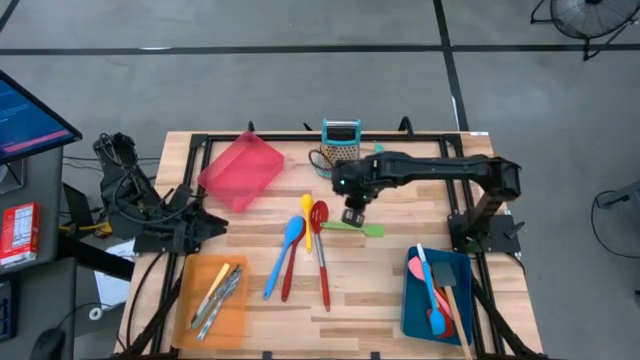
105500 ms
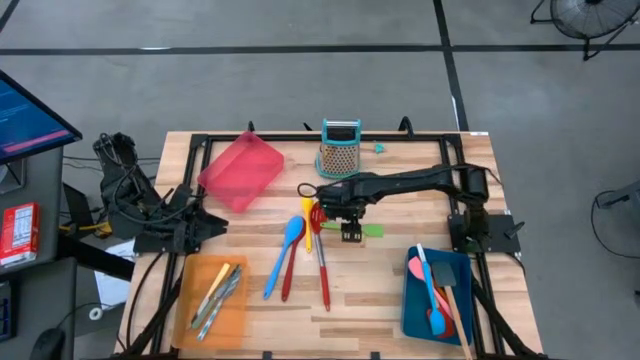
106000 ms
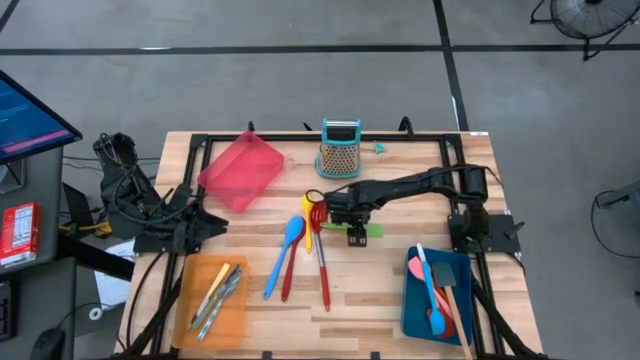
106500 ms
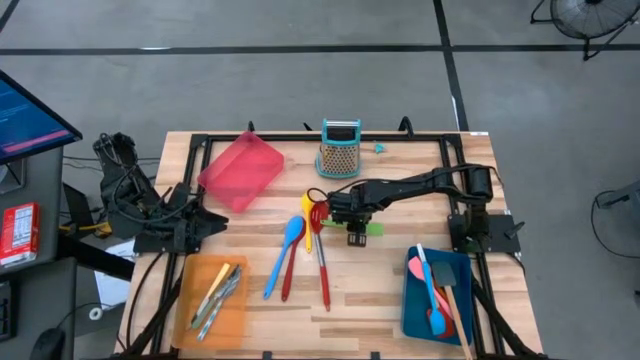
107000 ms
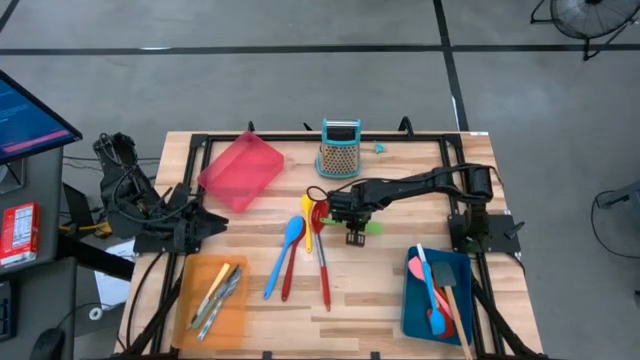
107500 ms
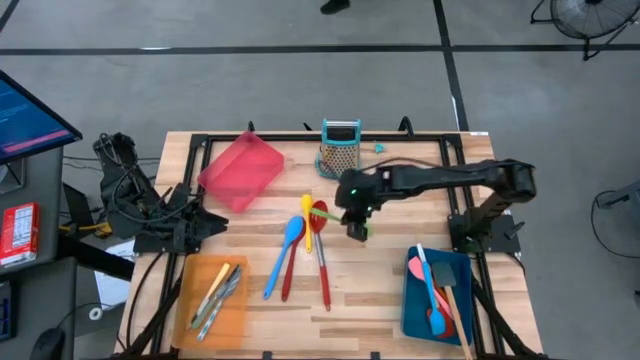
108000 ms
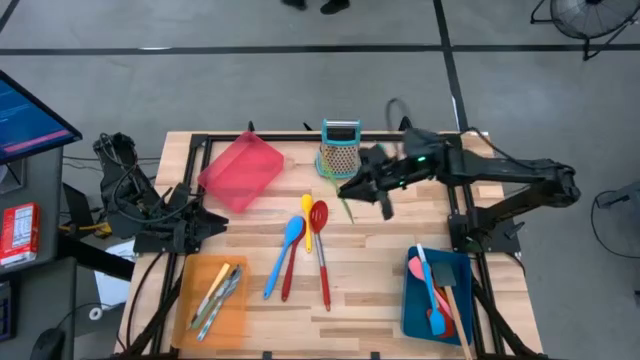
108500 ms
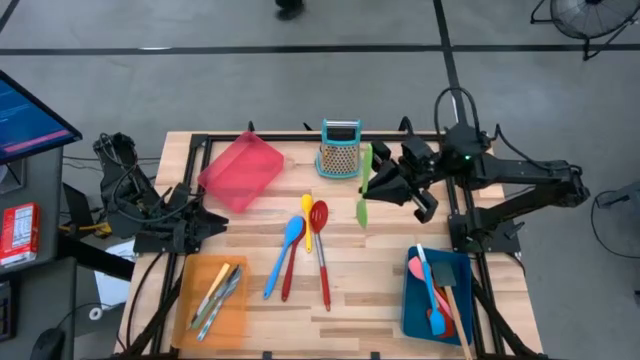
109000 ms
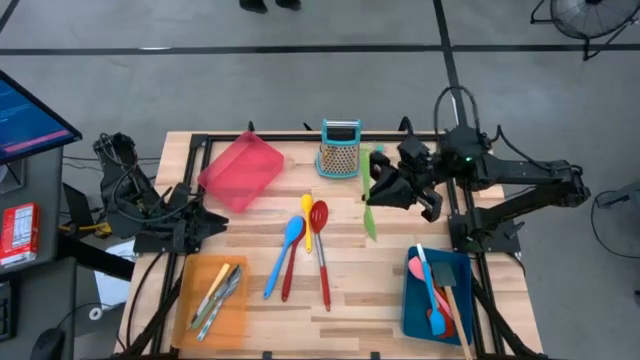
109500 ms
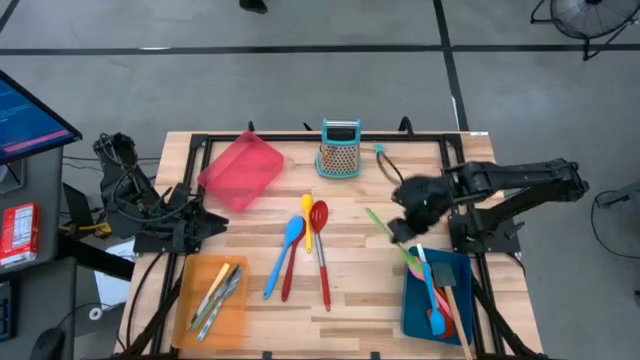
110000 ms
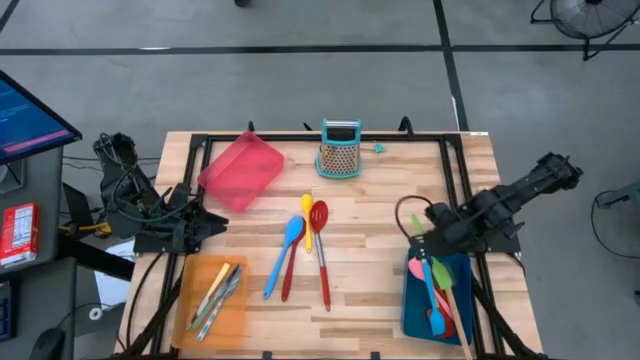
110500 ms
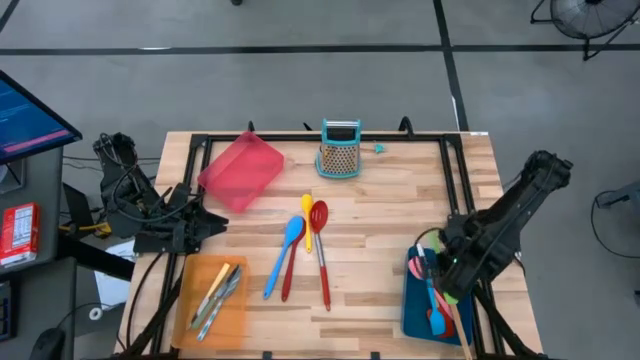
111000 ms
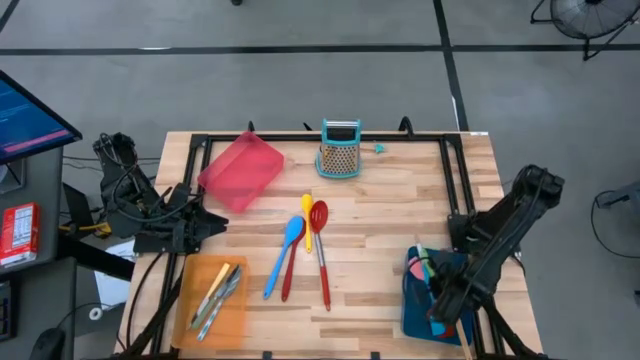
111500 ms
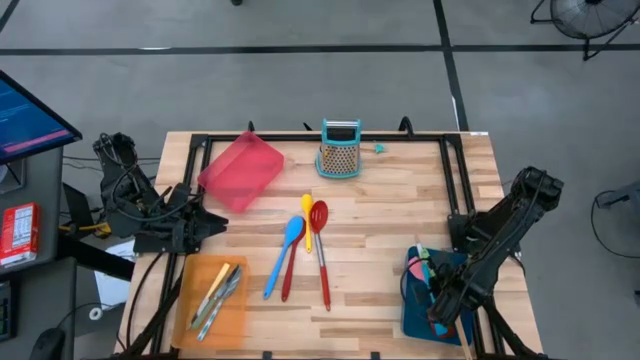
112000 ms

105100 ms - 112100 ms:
Task: Pick & Place Kitchen Items
Put the green spatula into the blue bin

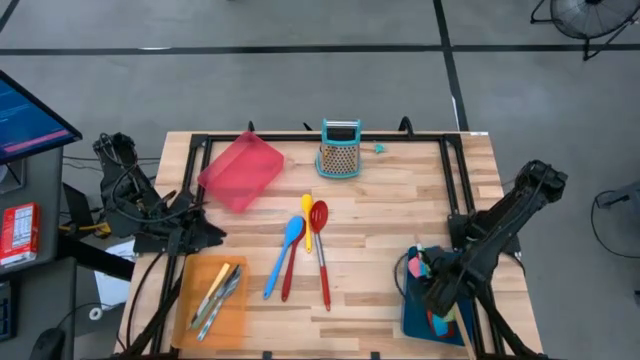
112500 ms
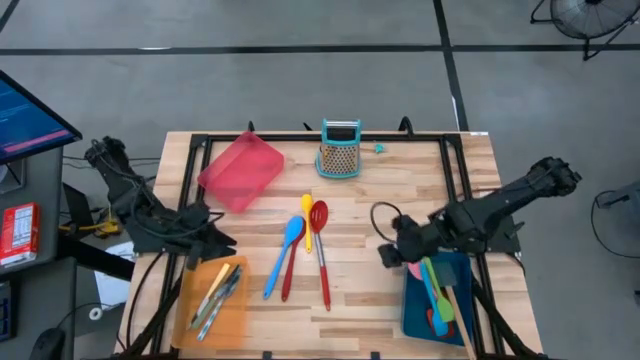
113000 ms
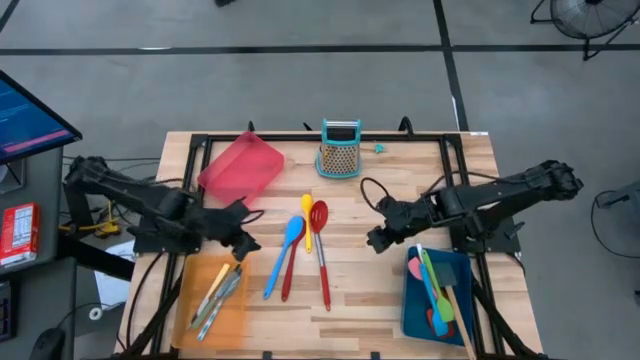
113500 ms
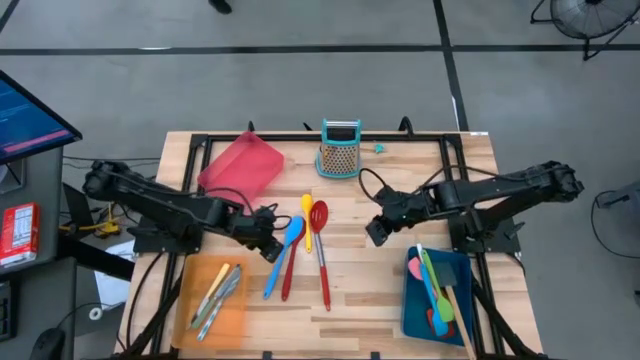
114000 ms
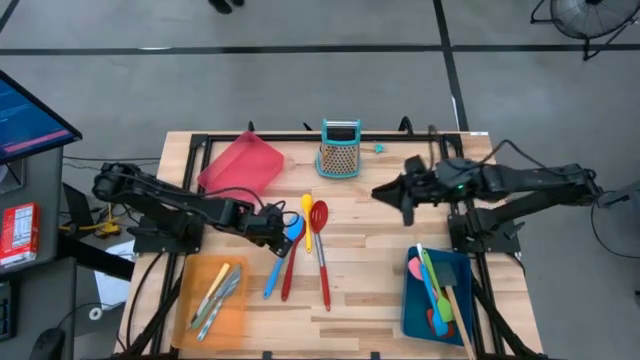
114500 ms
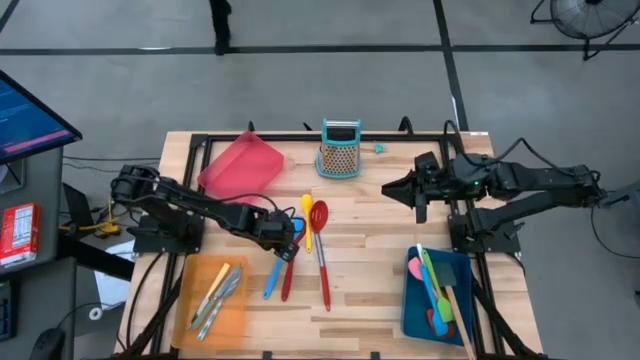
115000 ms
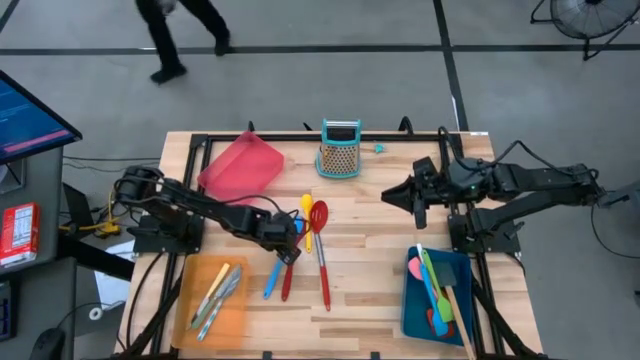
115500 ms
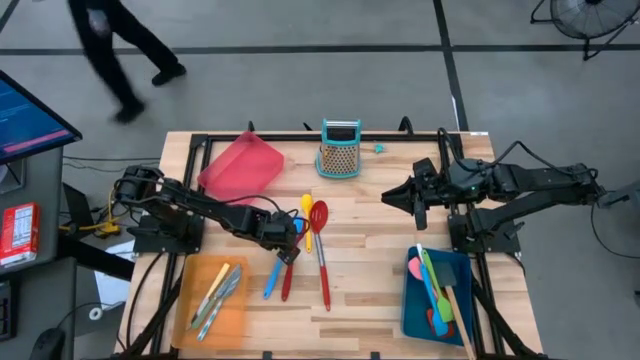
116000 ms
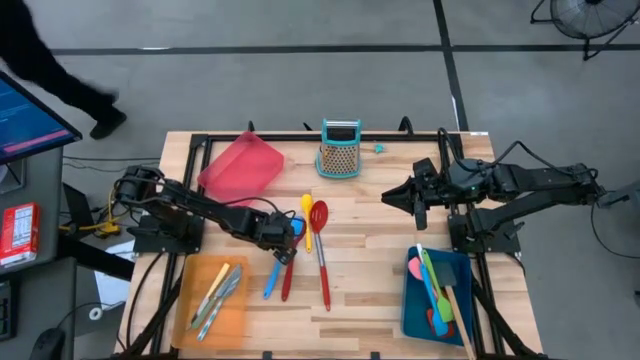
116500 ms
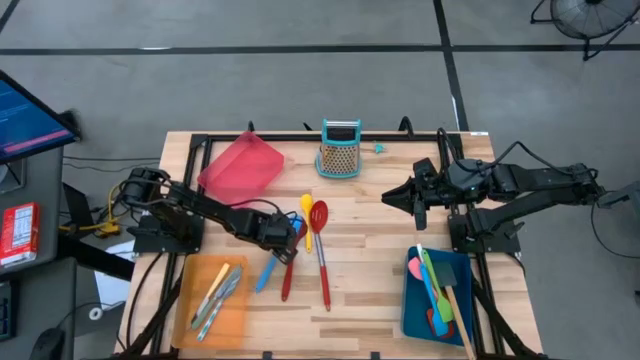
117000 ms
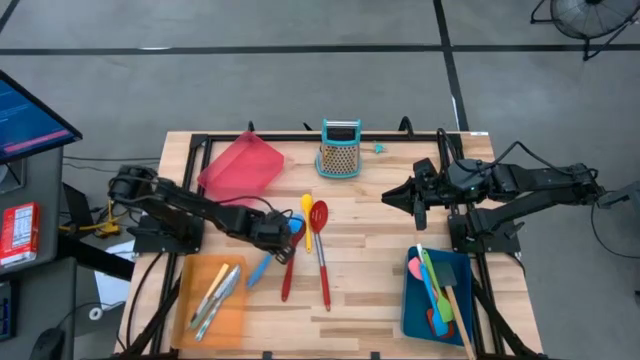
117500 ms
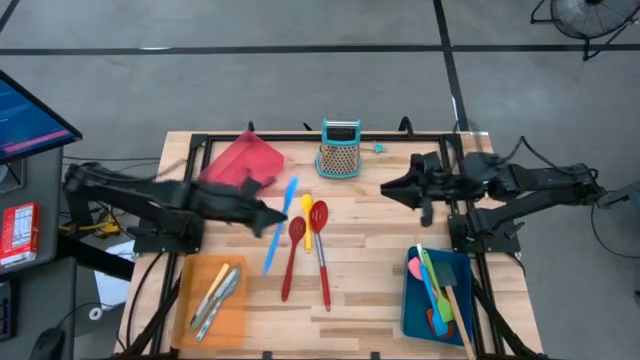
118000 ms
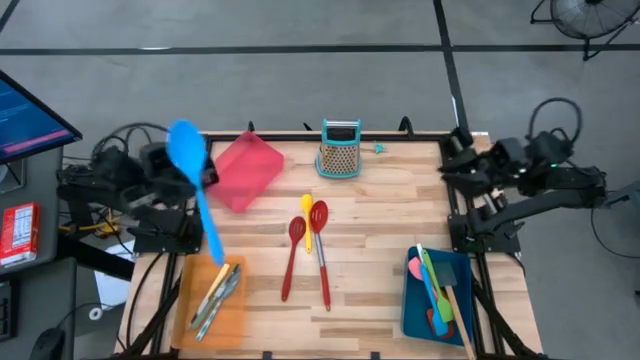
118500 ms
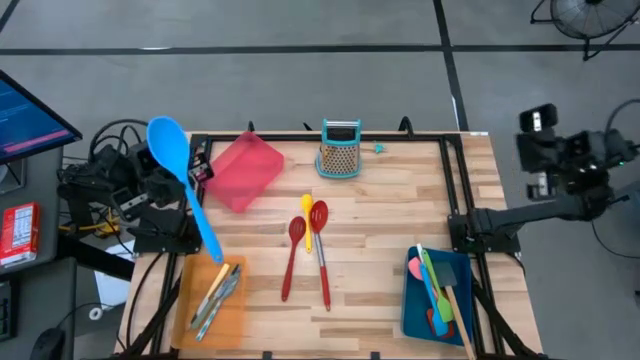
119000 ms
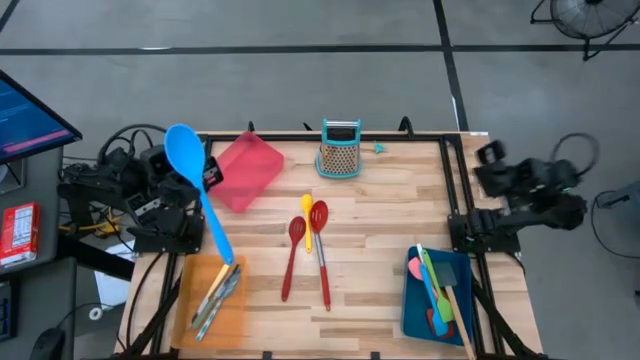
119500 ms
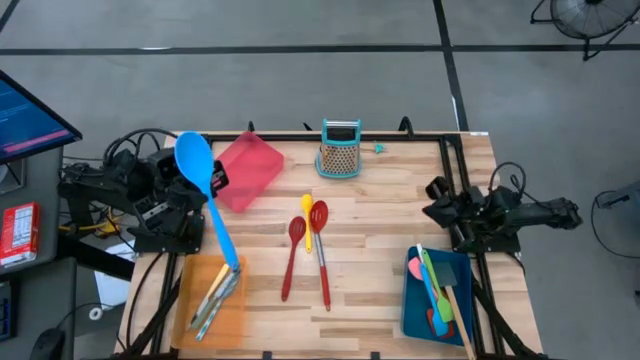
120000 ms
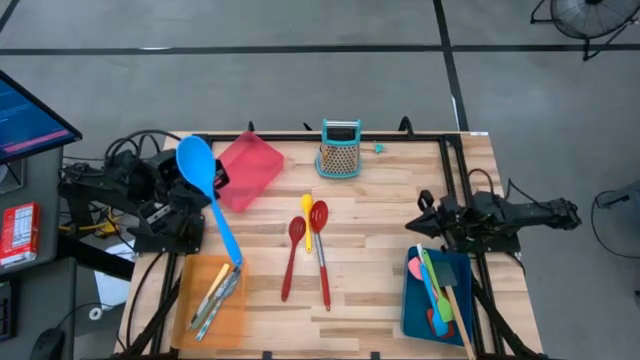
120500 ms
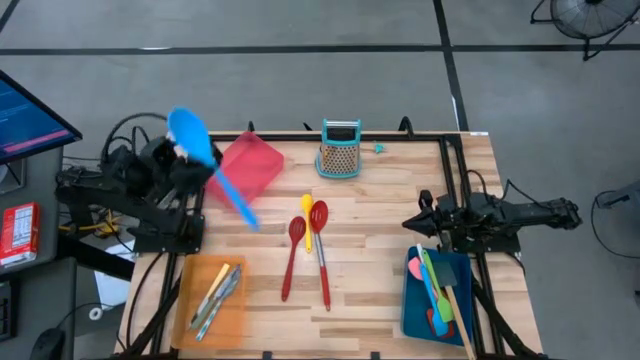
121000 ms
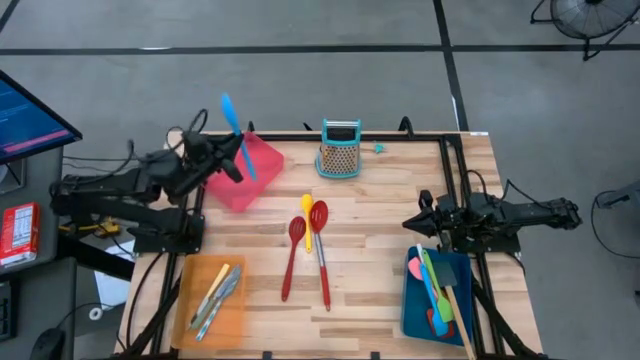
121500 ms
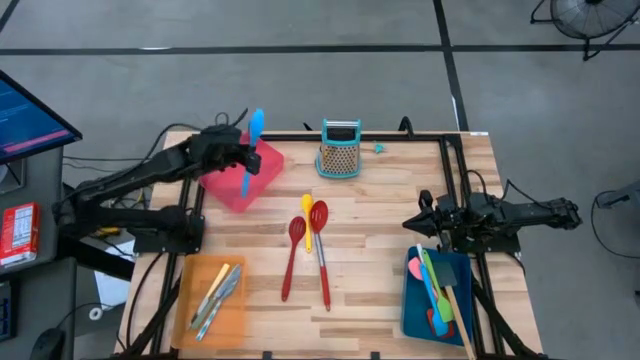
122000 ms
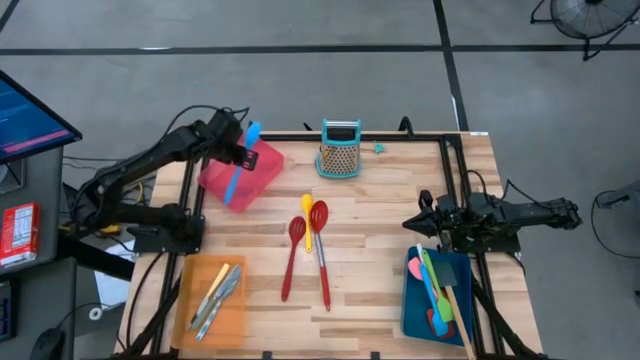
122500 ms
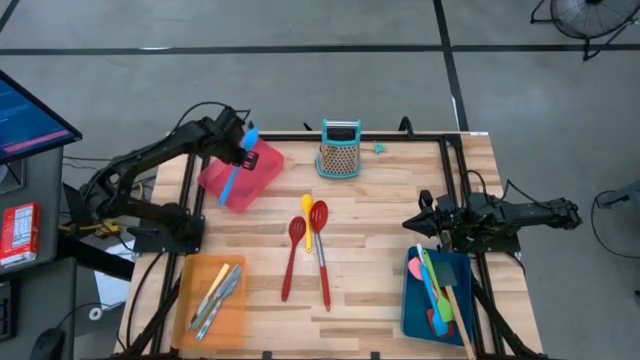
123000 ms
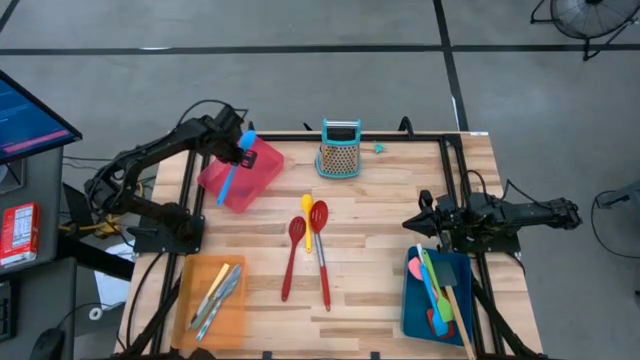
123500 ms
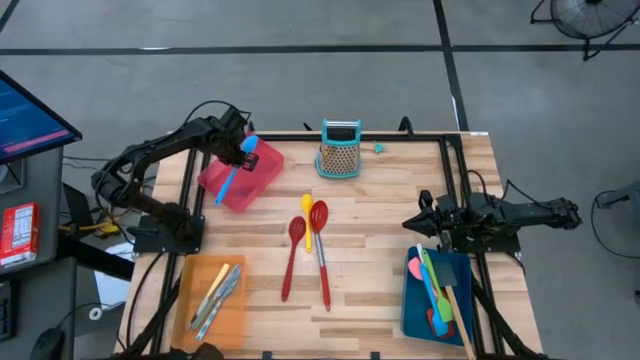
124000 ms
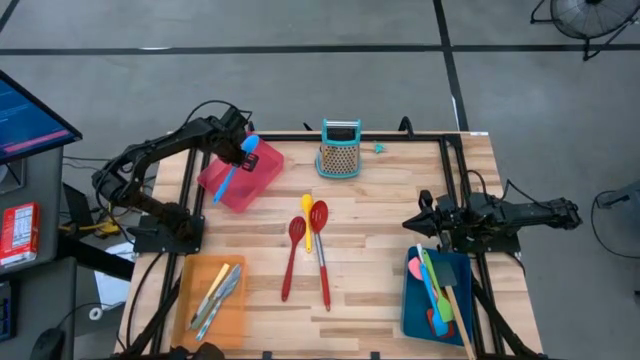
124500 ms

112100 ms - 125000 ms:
Put the blue serving spoon into the red bin

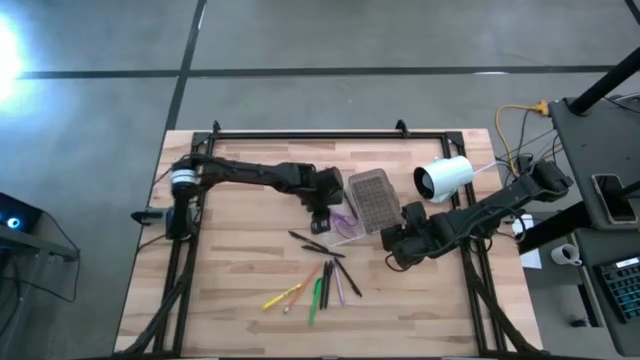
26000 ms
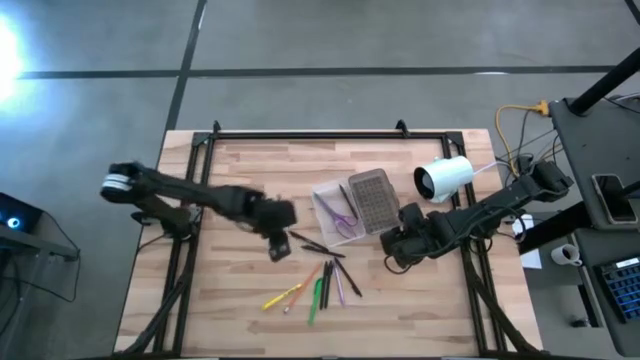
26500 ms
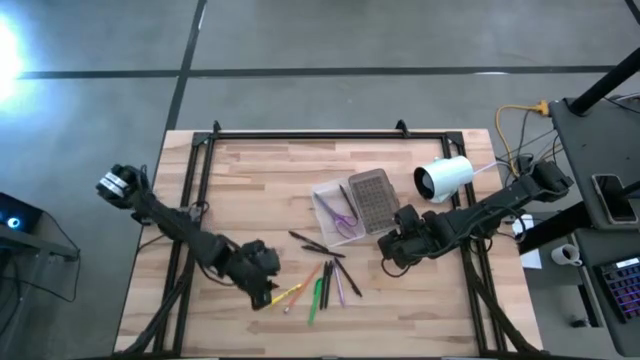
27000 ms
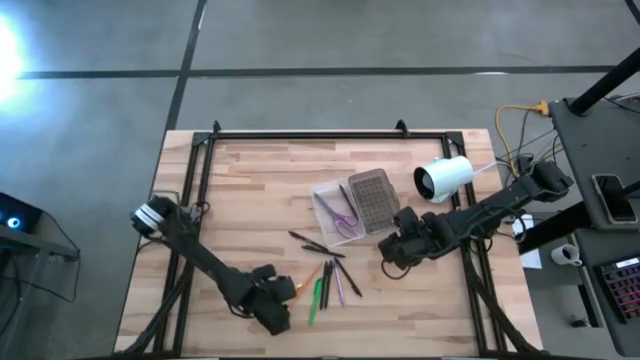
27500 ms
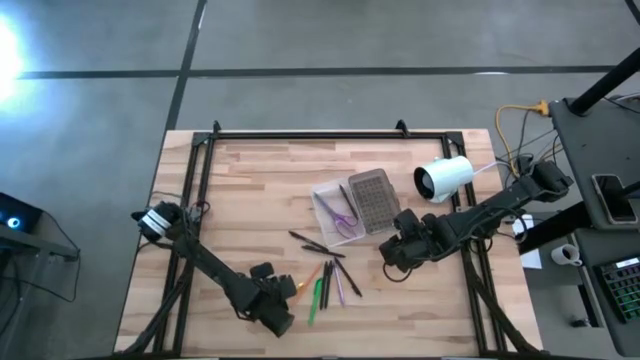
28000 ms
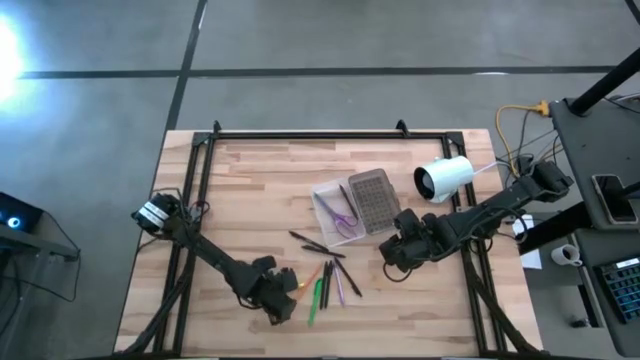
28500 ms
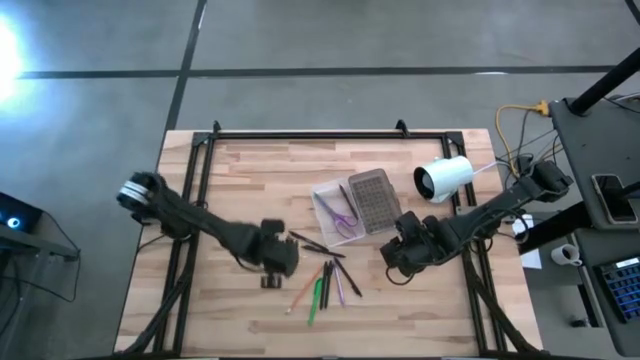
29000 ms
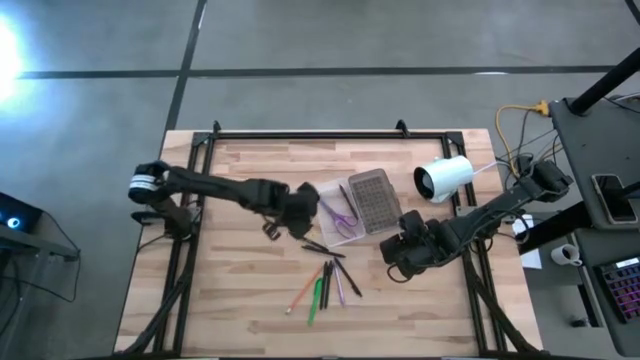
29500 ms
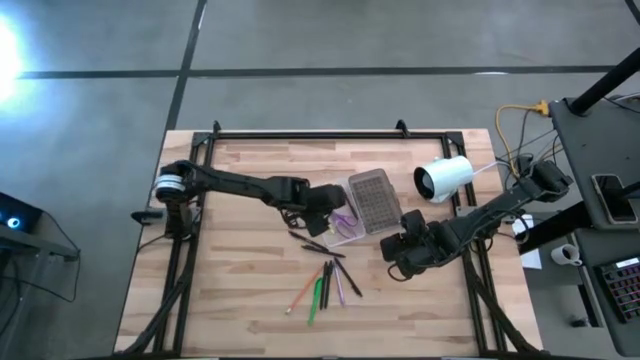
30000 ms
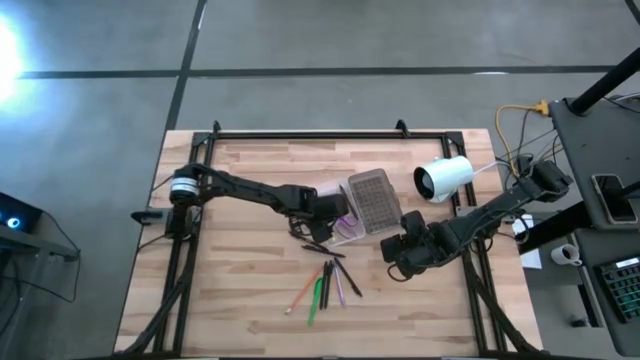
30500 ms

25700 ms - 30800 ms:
Task: Pick & place school supplies into a supply box
Put the yellow pen into the supply box
